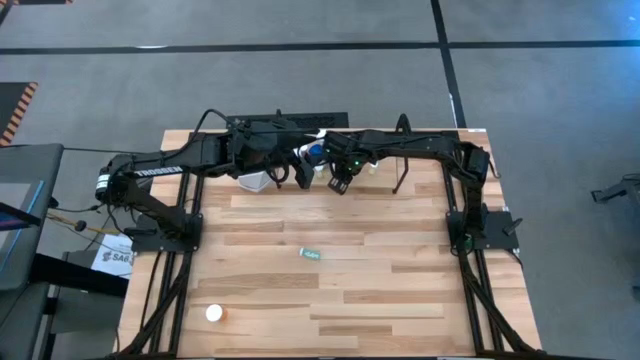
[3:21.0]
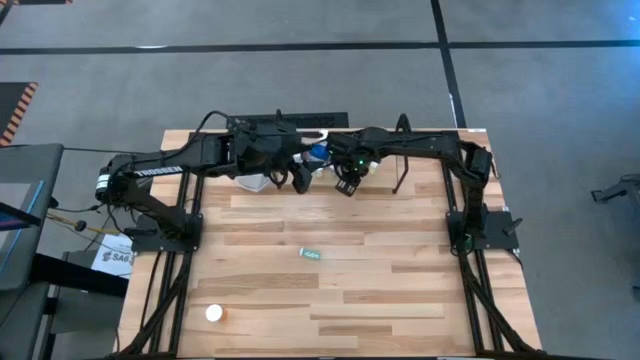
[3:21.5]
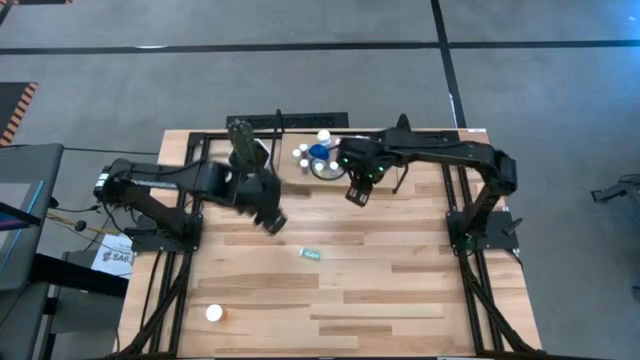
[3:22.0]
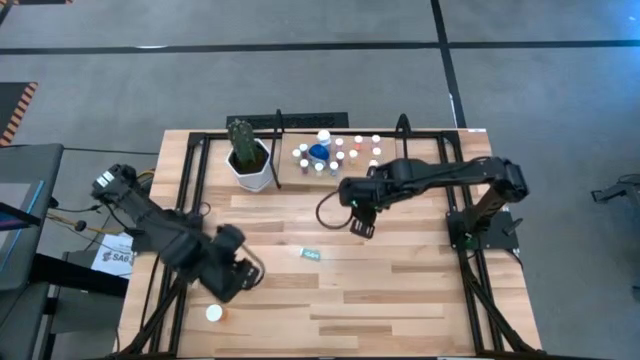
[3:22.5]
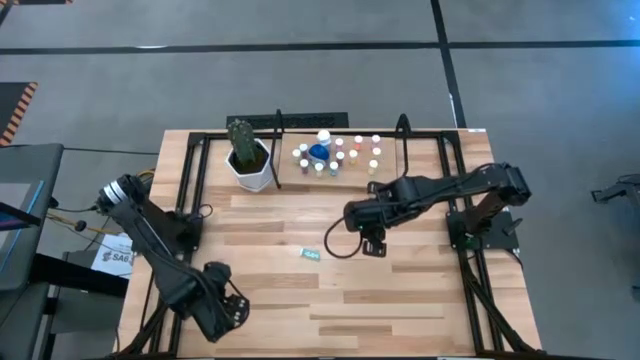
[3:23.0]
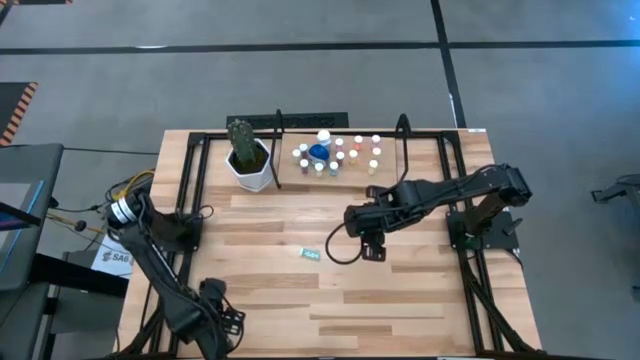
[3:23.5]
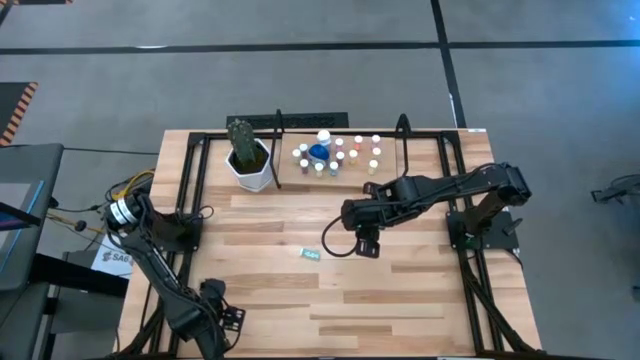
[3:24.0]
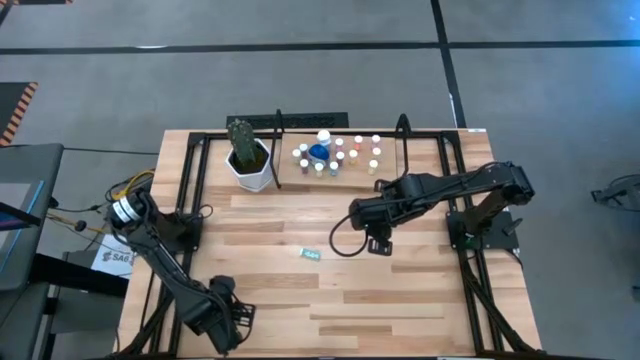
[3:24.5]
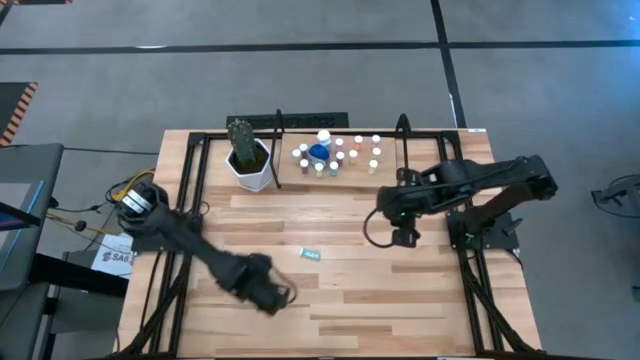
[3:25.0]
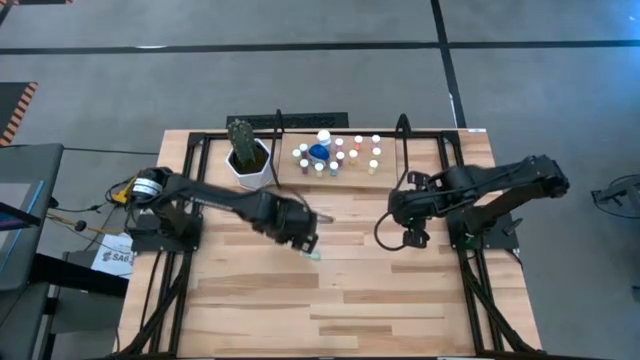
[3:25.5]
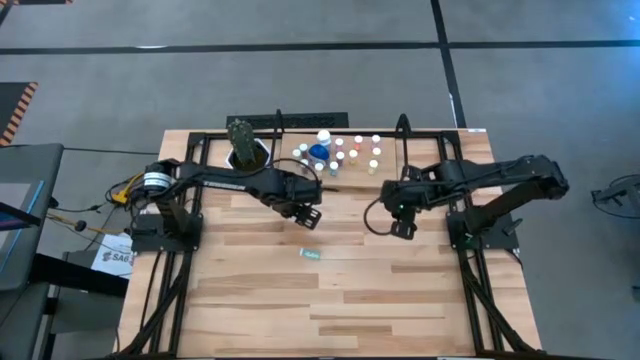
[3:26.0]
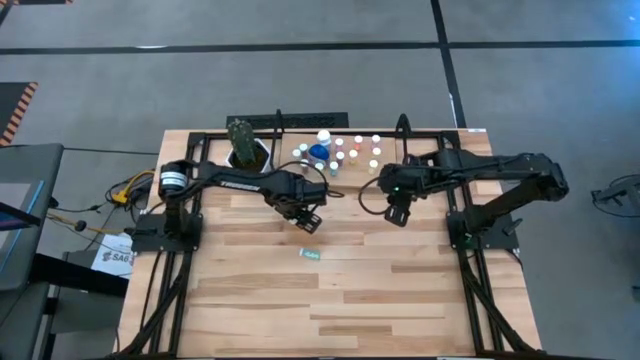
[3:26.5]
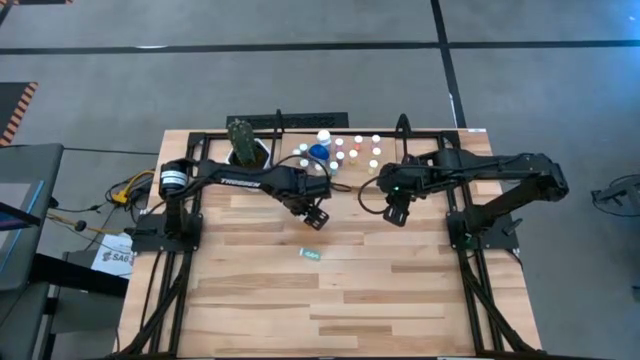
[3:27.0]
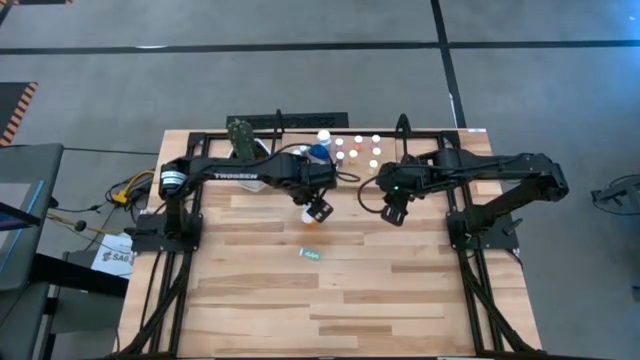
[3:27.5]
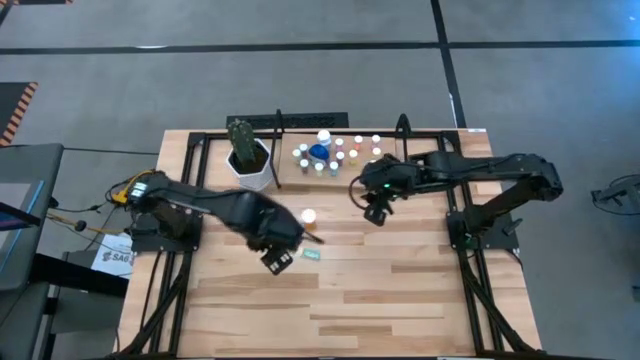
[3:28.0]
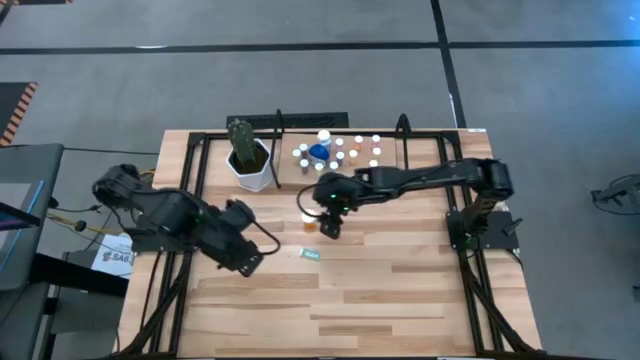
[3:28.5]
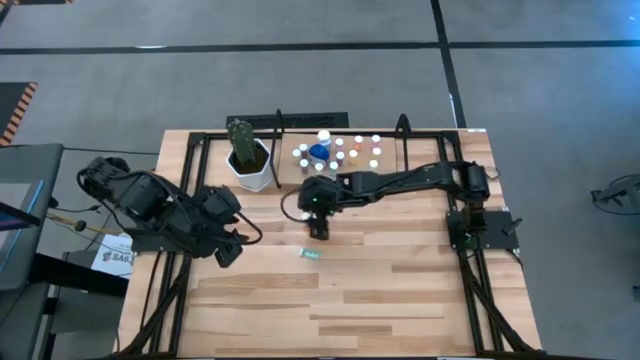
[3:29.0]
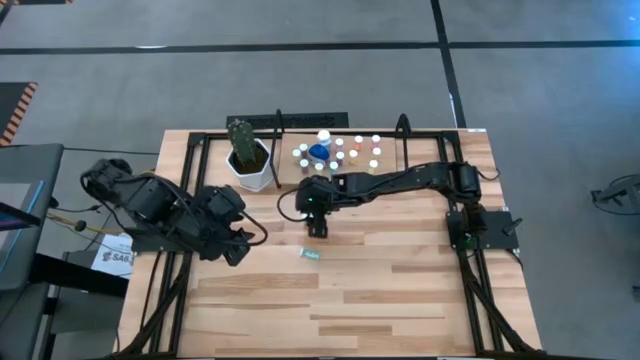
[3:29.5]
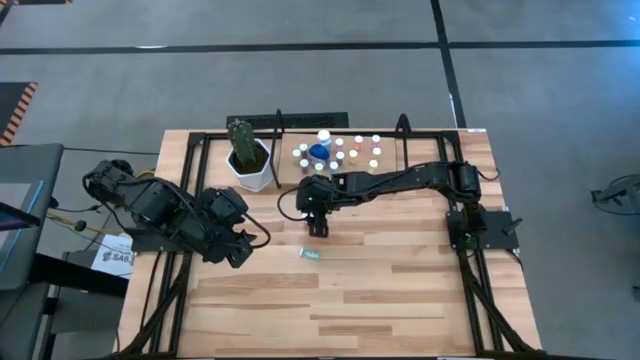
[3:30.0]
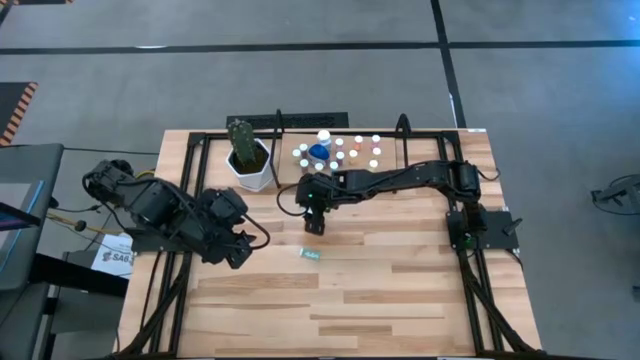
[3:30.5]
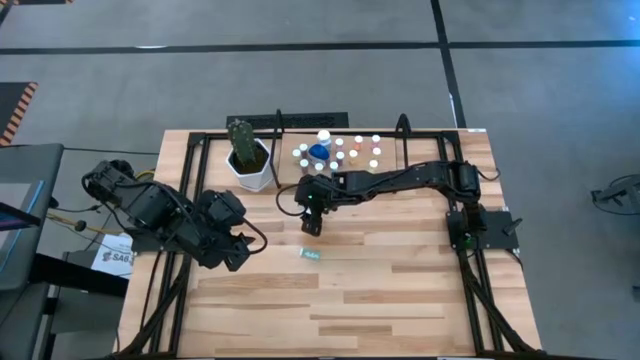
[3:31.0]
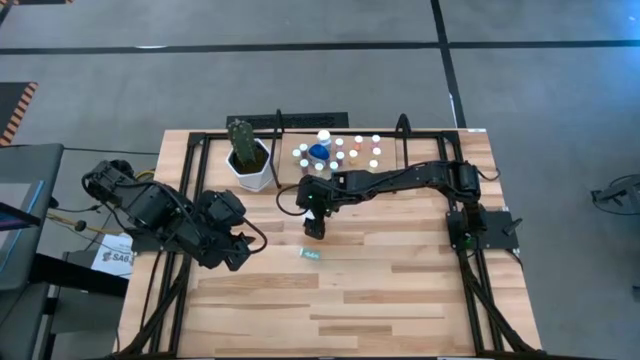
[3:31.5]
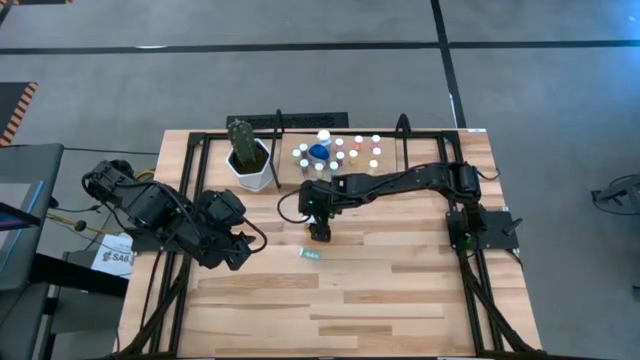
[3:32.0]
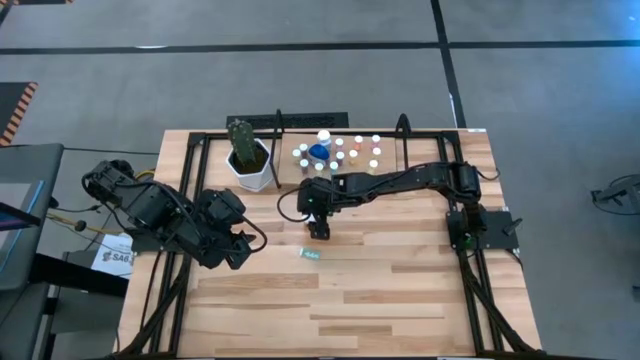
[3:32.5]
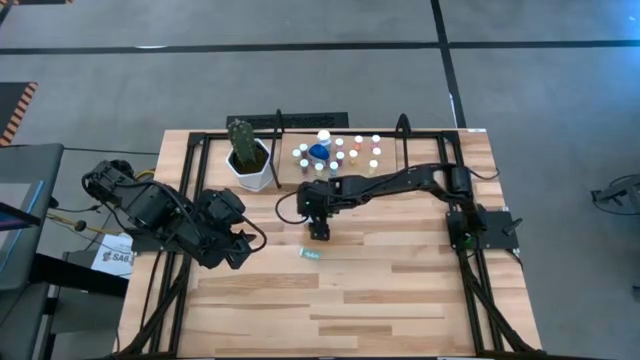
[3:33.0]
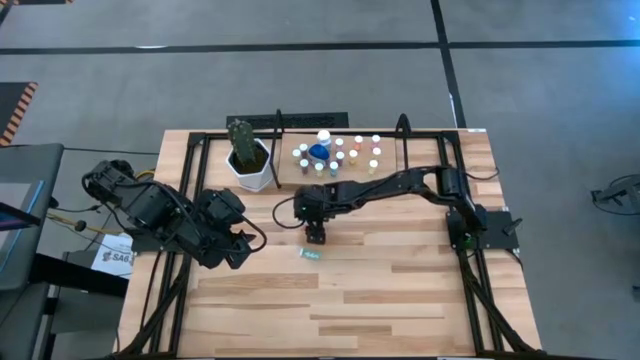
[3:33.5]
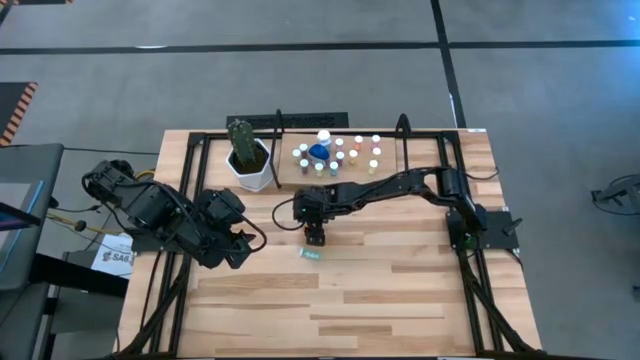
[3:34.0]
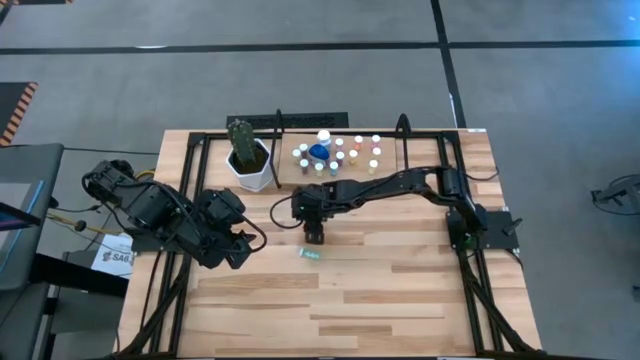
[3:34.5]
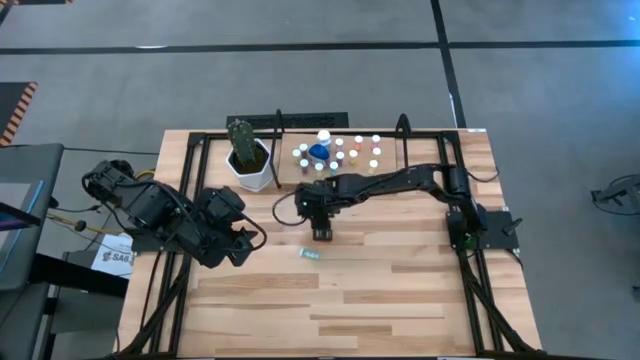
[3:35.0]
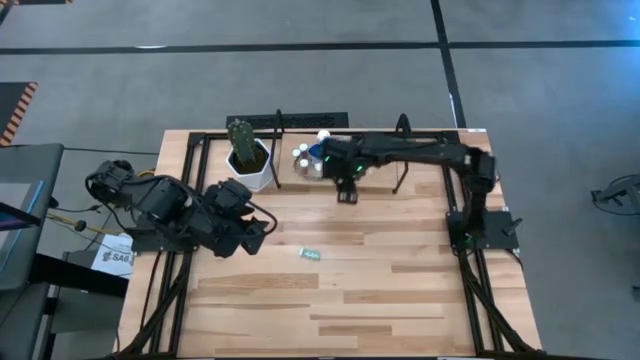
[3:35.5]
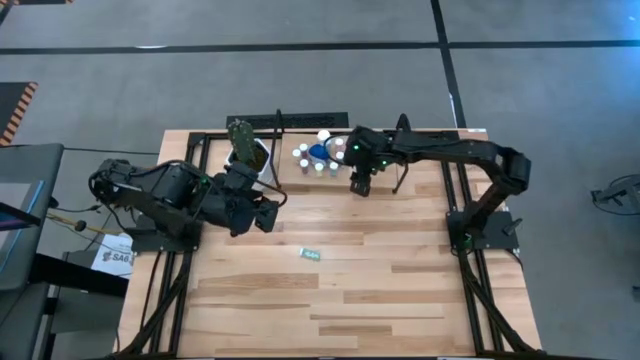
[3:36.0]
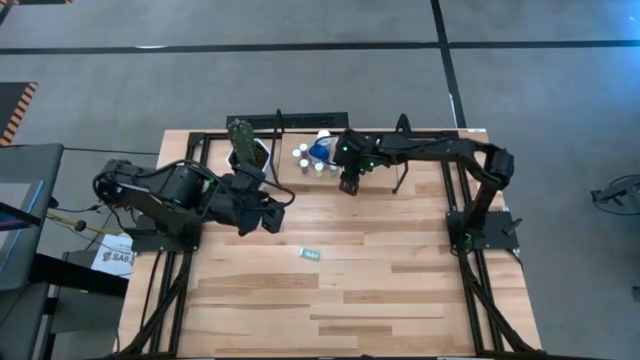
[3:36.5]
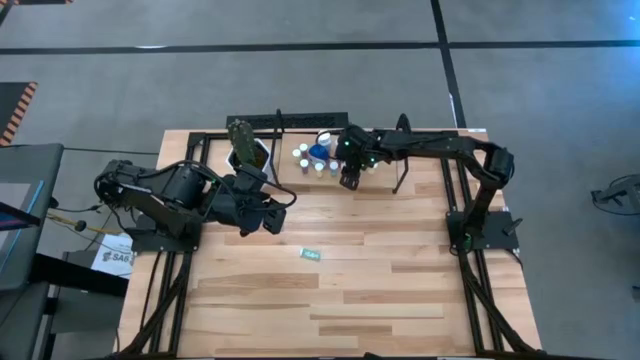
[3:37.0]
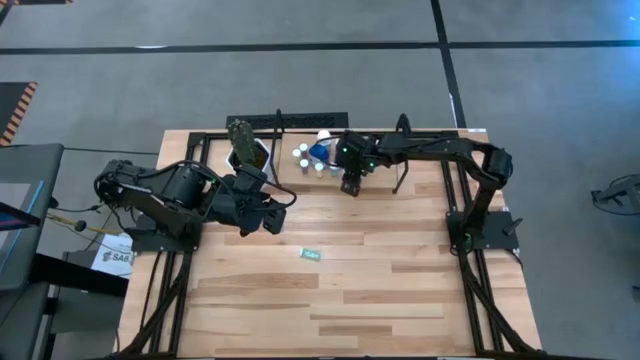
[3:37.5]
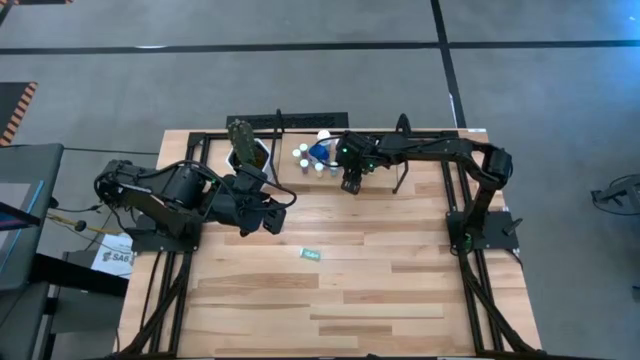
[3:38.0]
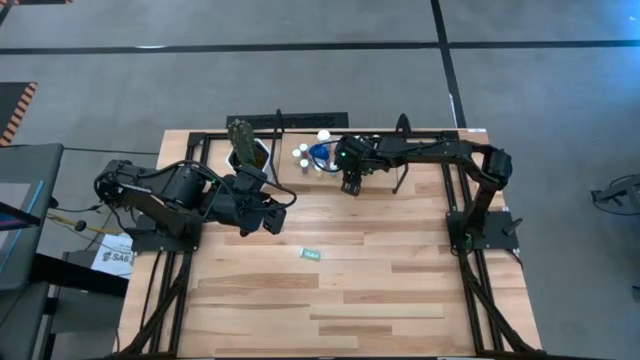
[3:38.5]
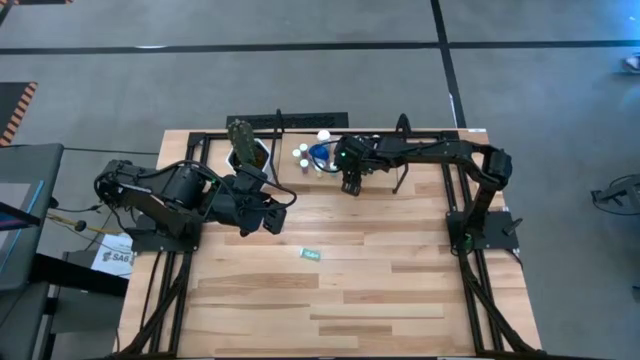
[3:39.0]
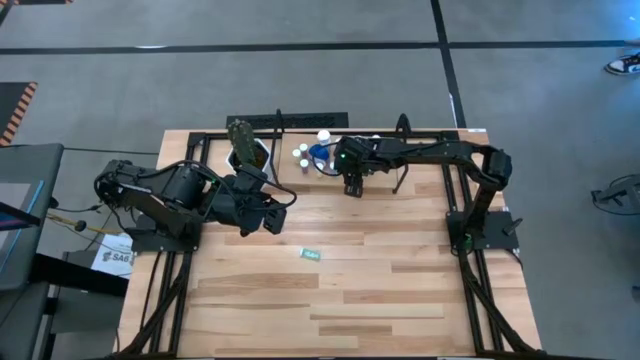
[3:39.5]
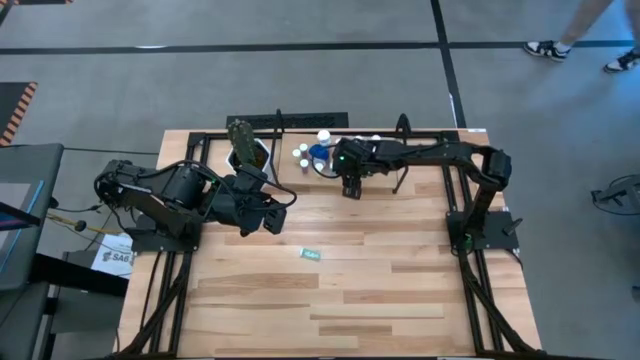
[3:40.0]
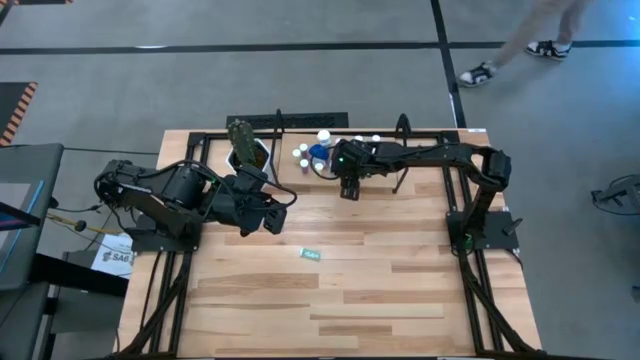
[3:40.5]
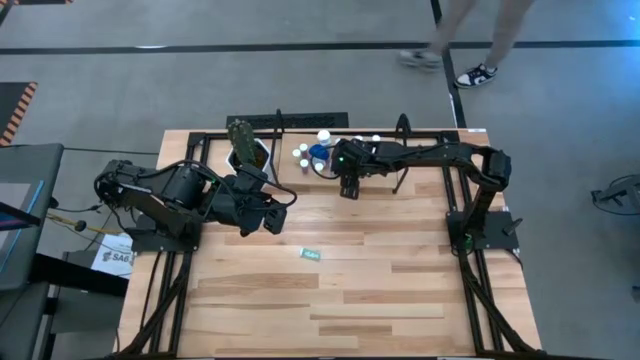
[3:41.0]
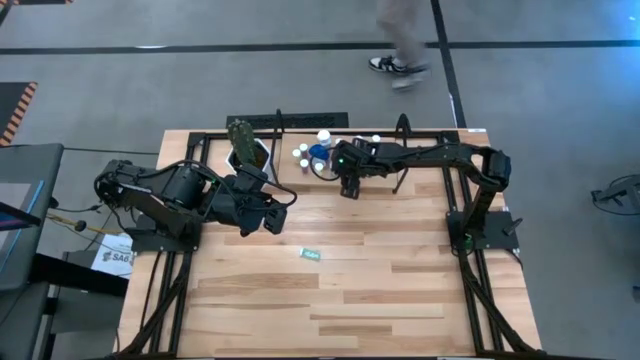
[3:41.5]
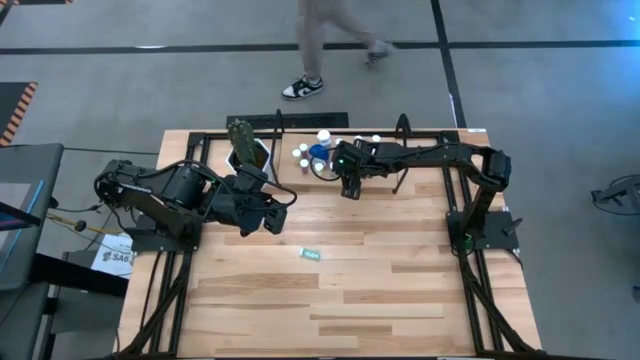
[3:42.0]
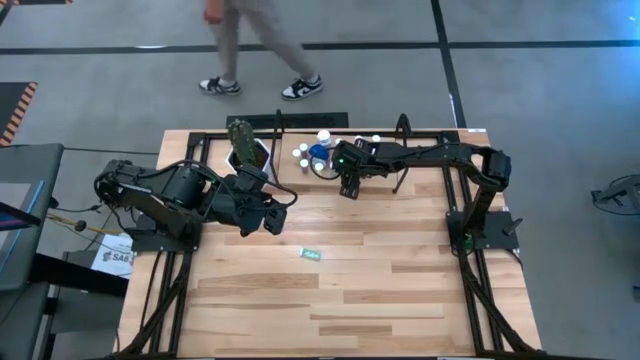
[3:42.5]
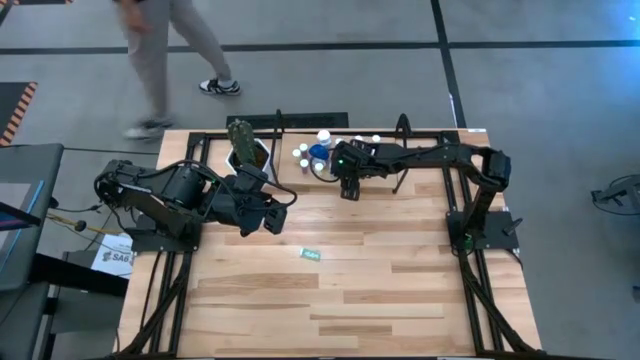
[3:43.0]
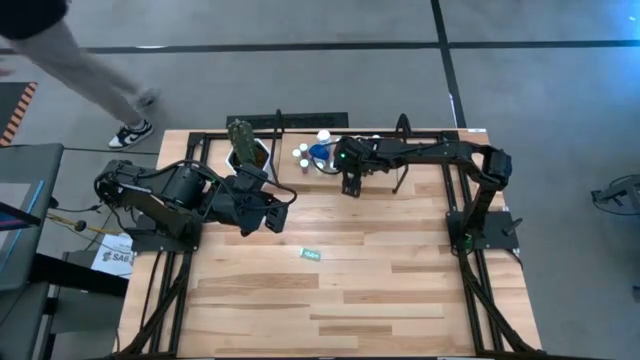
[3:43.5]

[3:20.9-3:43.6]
Task: Pick and place medicine bottles onto shelf by color
Put the large orange pill bottle on the shelf
